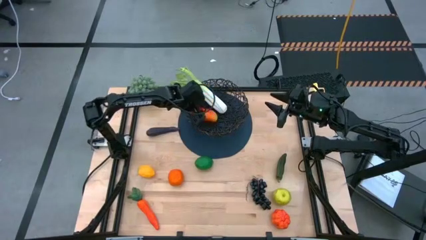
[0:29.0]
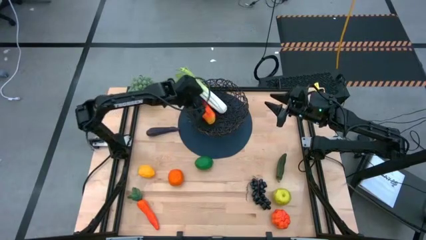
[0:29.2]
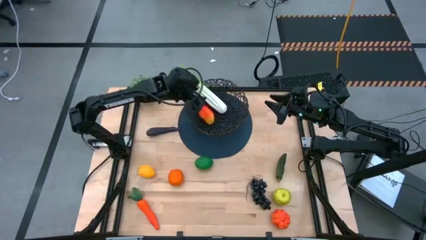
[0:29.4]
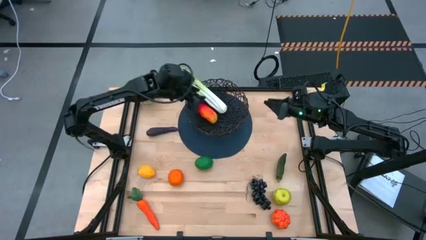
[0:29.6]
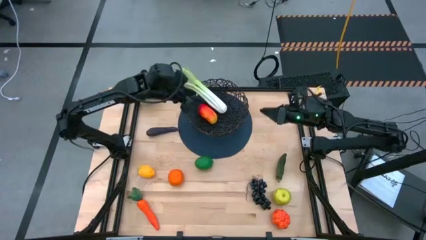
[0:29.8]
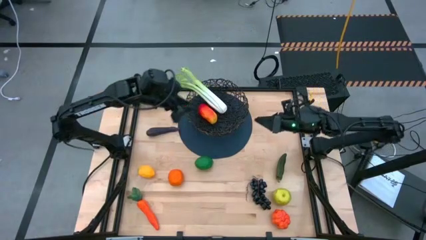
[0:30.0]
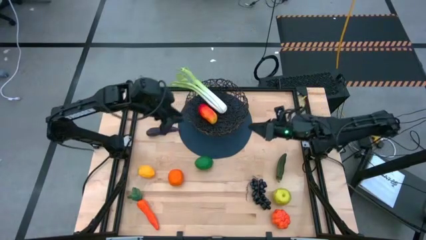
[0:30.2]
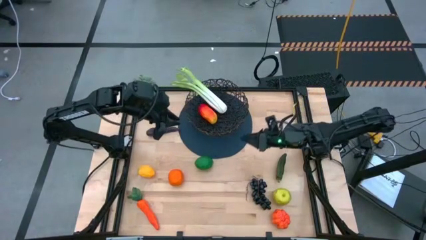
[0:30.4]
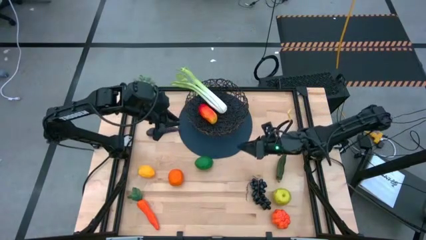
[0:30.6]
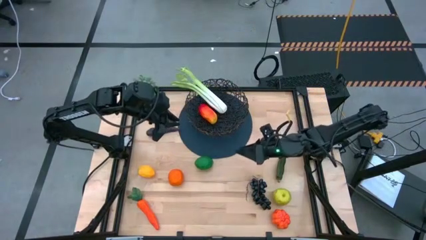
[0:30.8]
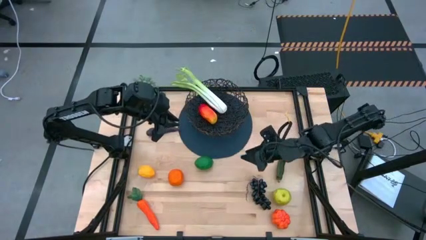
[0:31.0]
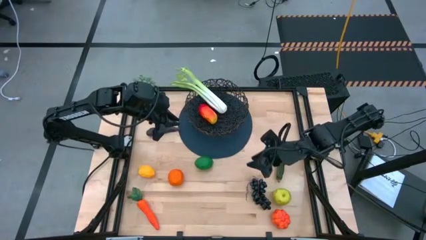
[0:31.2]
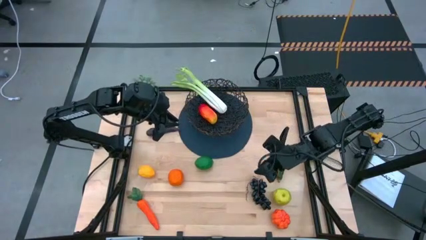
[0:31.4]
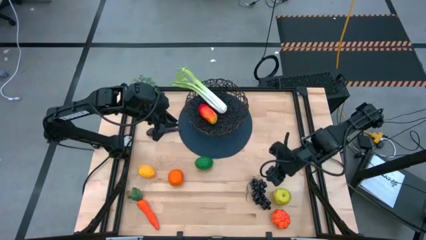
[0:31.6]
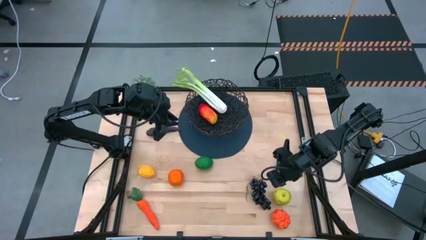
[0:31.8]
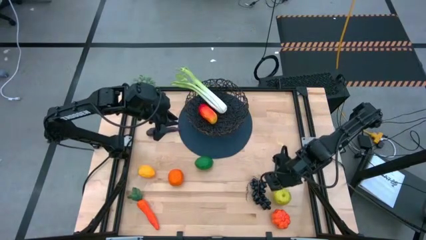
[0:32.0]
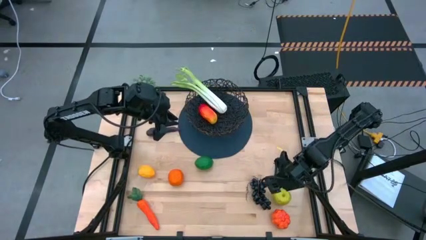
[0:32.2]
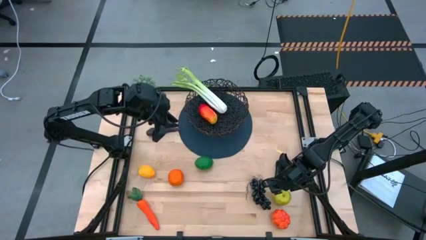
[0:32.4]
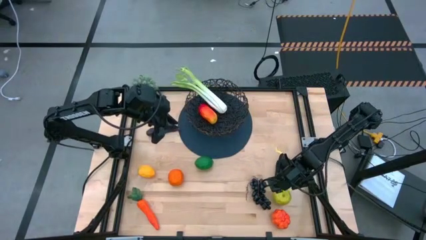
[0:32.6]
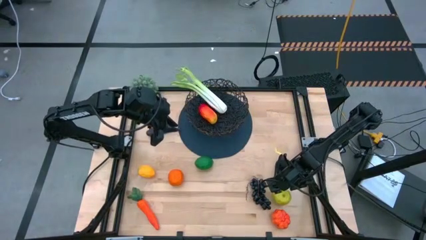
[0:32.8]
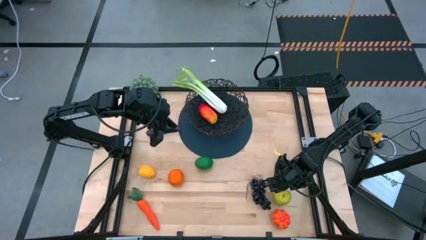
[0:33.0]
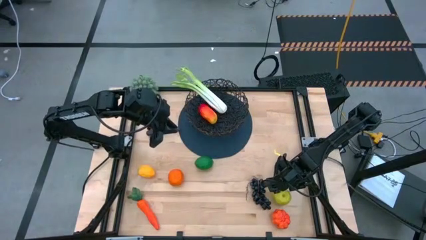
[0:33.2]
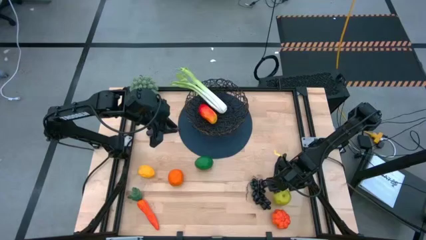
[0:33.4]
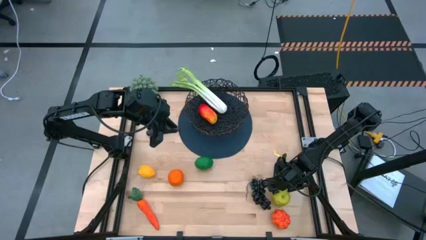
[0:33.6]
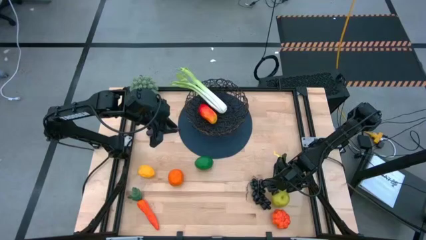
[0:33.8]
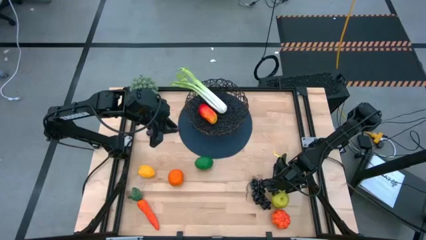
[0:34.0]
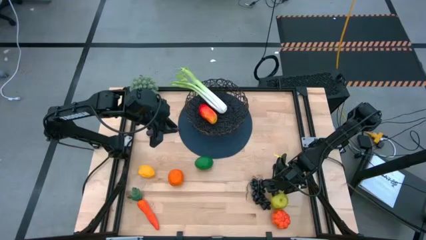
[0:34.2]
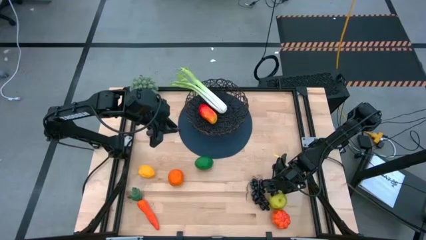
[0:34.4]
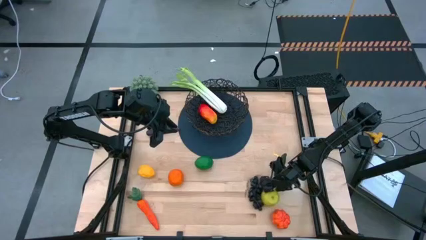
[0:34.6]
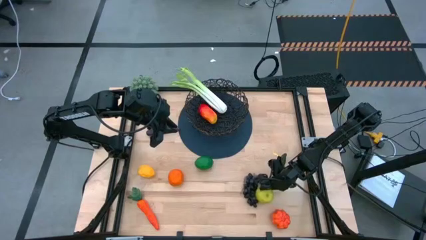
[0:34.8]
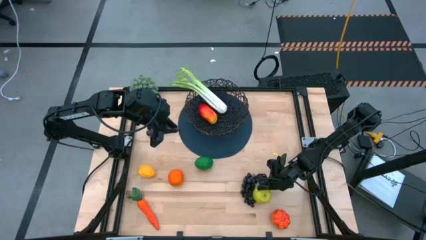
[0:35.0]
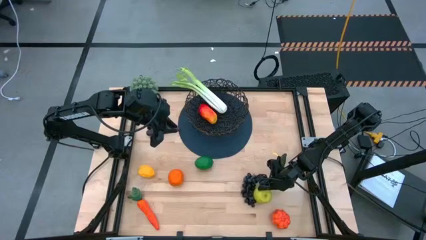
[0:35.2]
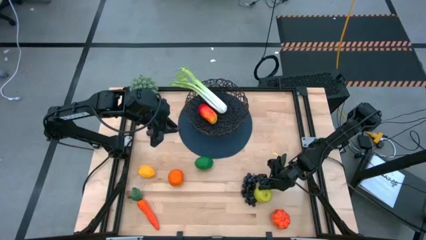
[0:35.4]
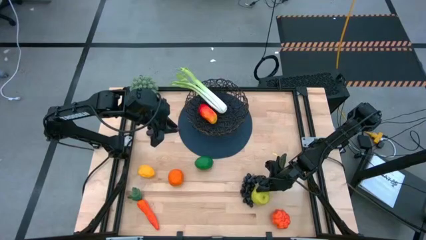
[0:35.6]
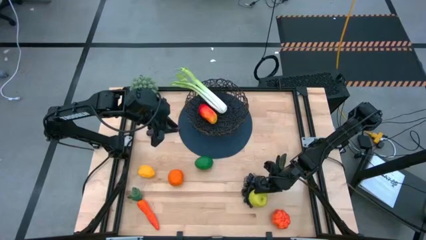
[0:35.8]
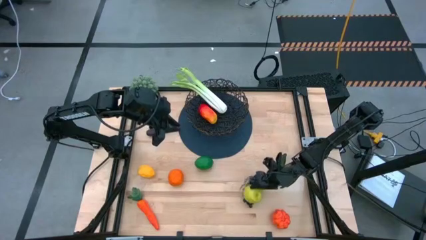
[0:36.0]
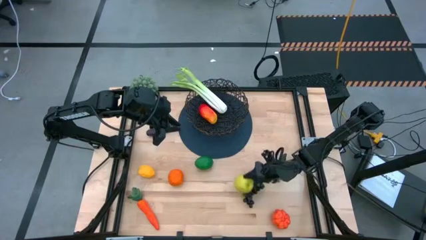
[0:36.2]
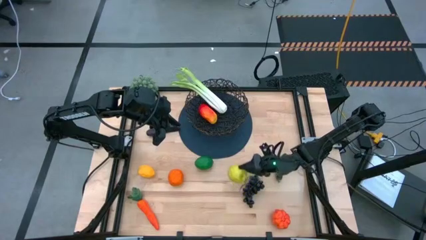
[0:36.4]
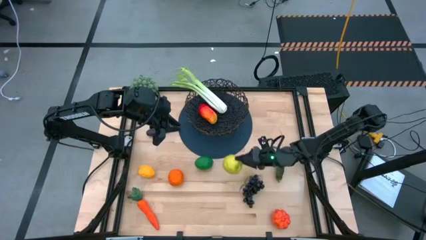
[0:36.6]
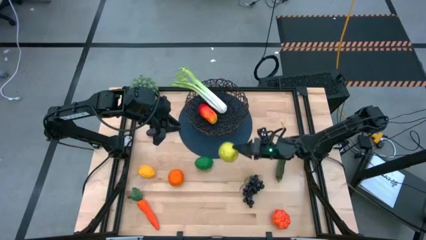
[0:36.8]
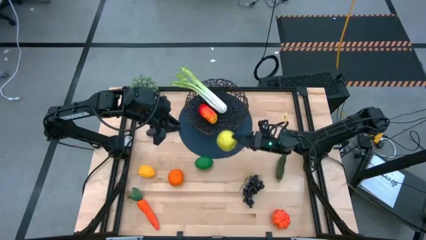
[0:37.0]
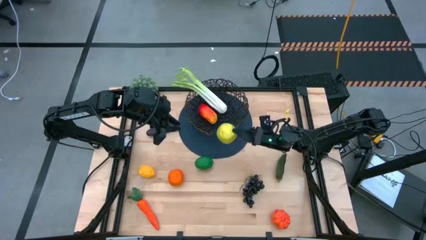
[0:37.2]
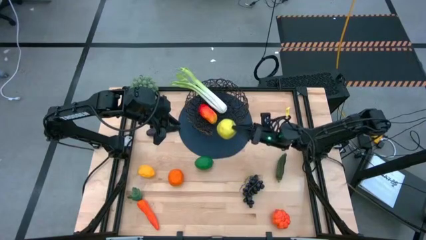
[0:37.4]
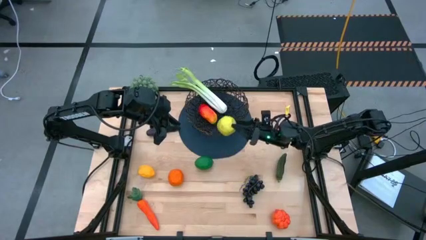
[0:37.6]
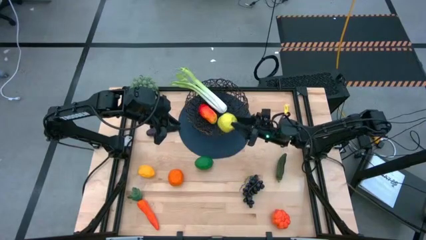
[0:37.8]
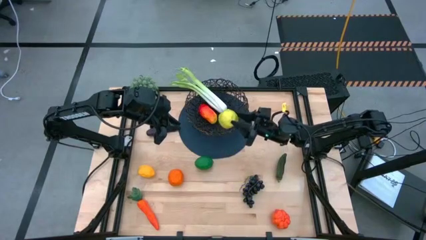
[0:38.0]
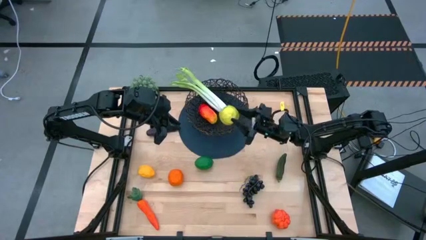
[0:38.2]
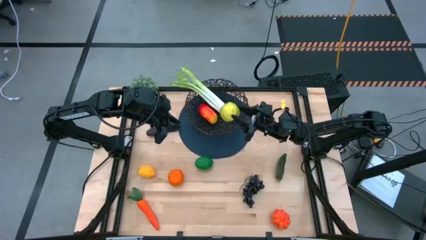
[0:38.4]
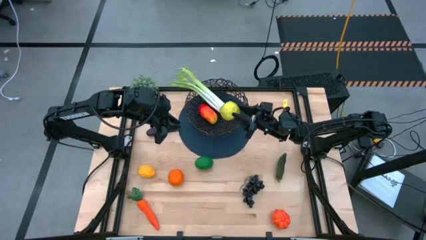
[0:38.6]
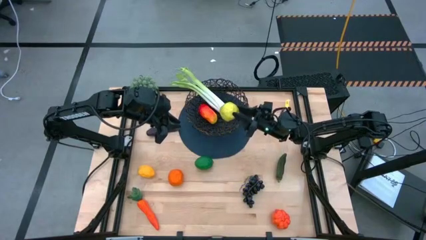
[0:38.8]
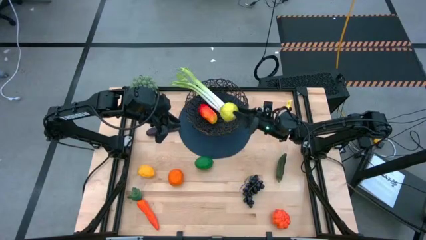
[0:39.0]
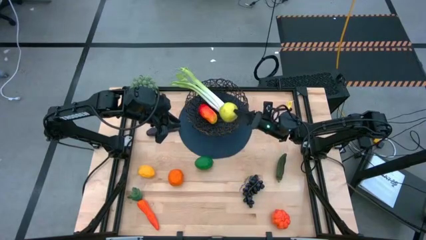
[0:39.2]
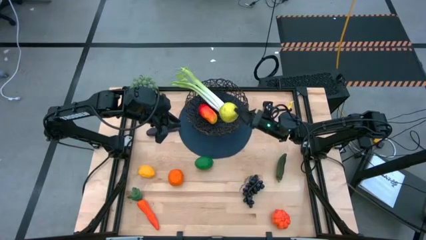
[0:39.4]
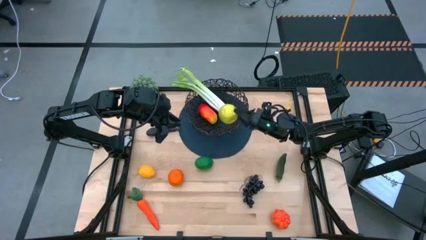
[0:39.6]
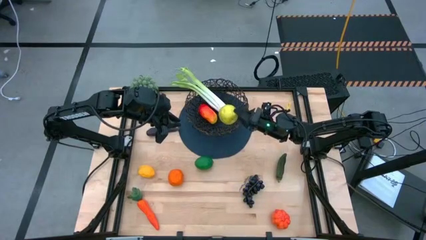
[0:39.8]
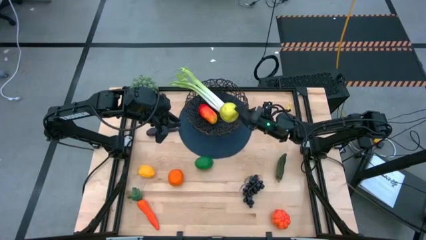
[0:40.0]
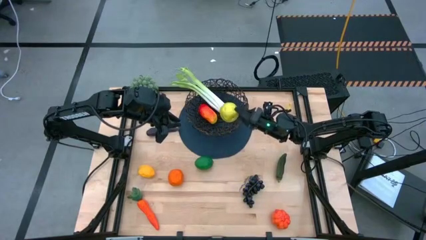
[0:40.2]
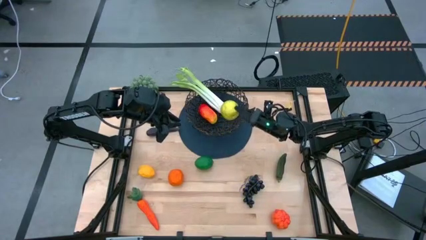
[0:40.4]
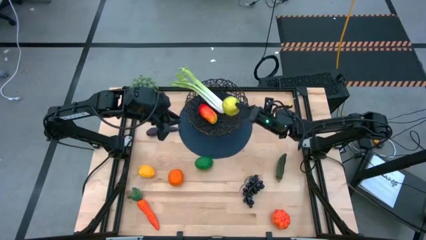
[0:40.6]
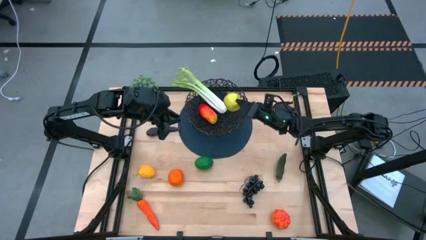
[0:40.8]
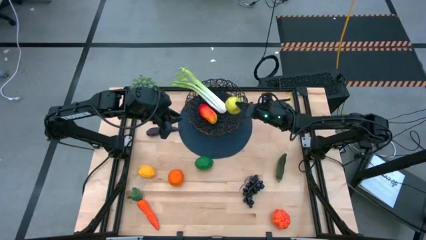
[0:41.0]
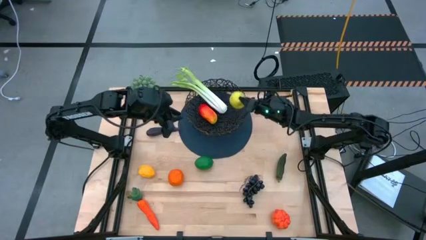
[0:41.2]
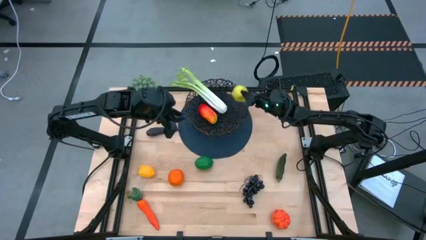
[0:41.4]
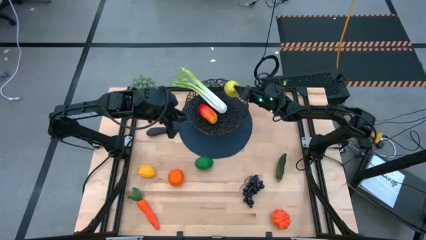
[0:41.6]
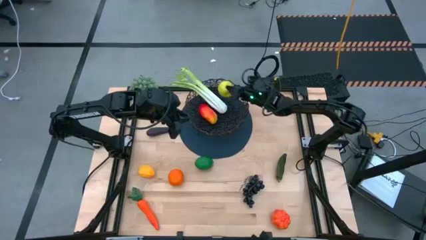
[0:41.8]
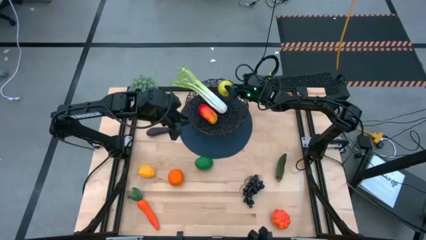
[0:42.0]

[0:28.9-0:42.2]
Task: Build produce basket
Put the green apple into the wire basket
